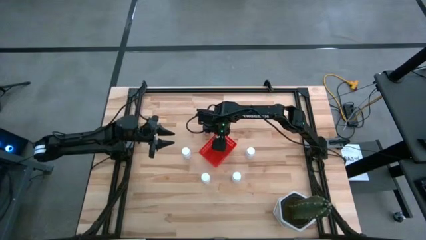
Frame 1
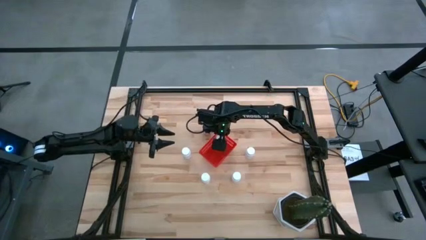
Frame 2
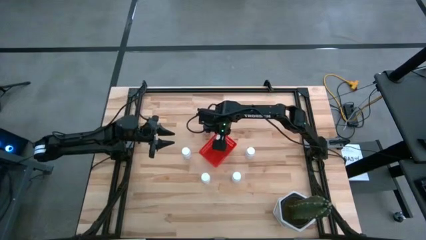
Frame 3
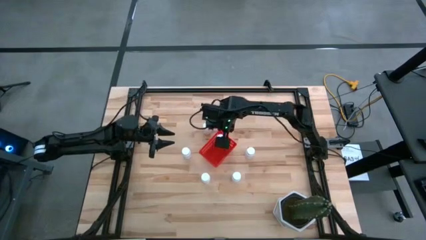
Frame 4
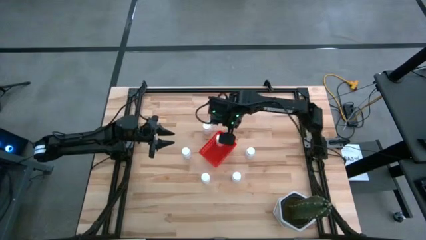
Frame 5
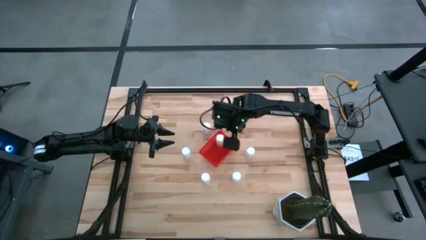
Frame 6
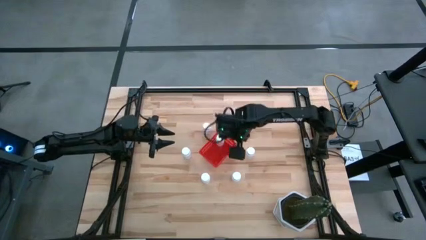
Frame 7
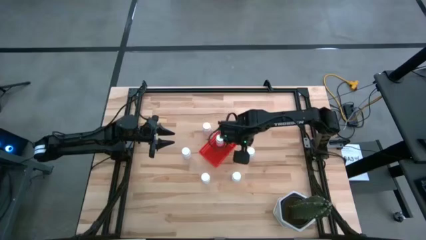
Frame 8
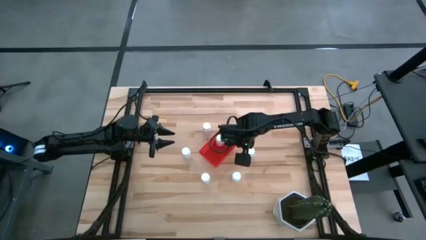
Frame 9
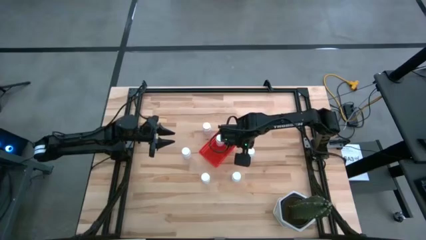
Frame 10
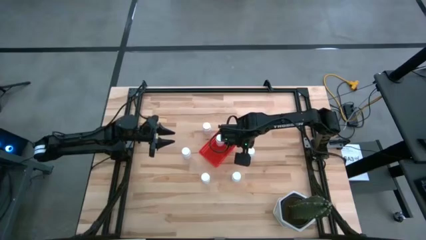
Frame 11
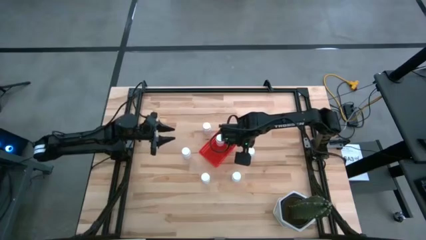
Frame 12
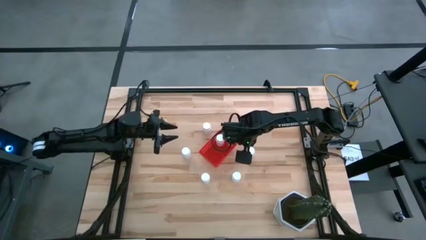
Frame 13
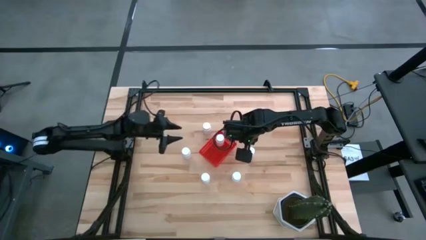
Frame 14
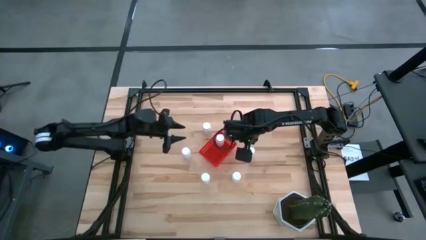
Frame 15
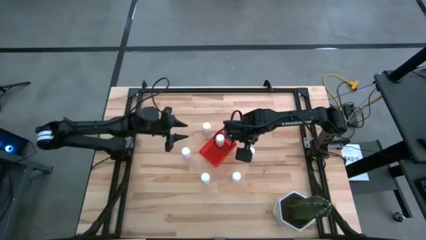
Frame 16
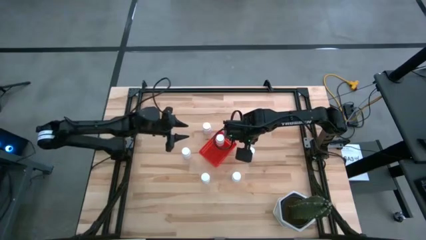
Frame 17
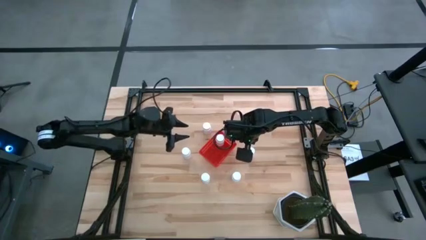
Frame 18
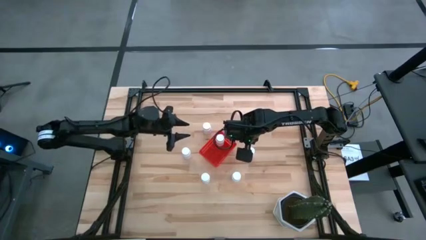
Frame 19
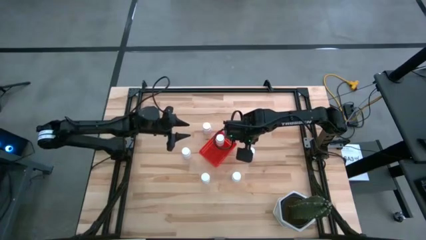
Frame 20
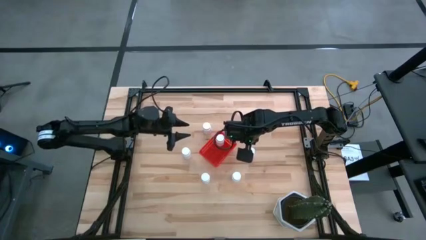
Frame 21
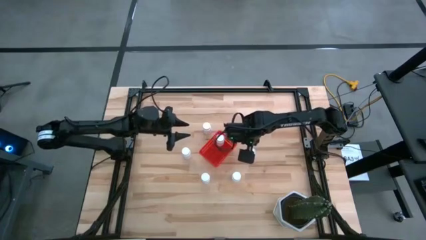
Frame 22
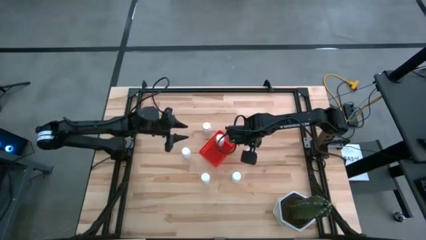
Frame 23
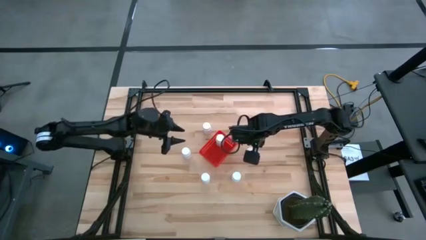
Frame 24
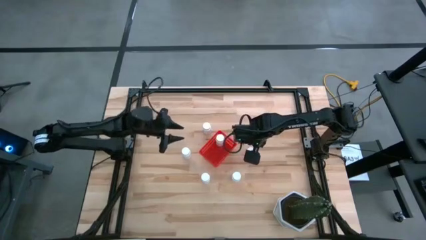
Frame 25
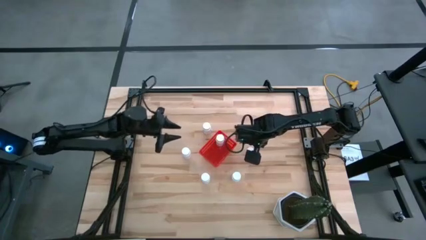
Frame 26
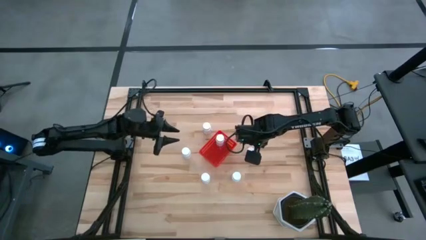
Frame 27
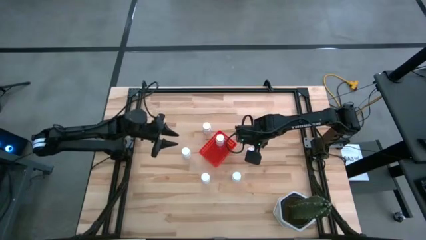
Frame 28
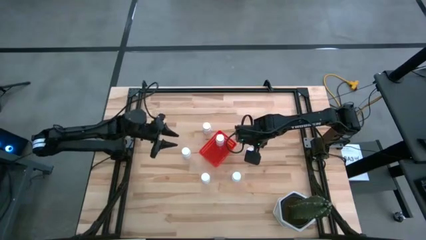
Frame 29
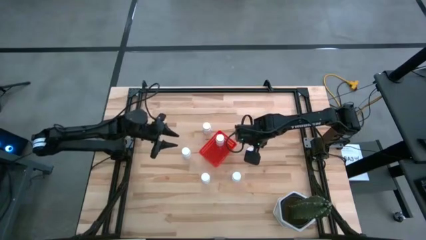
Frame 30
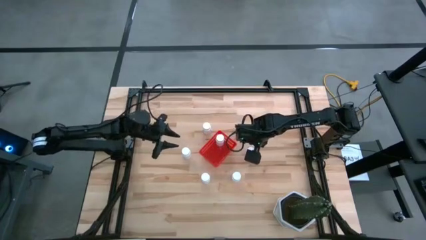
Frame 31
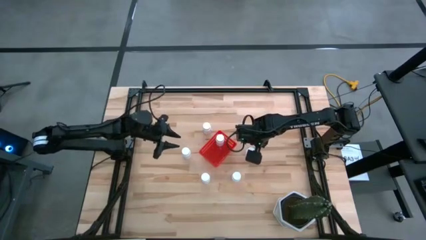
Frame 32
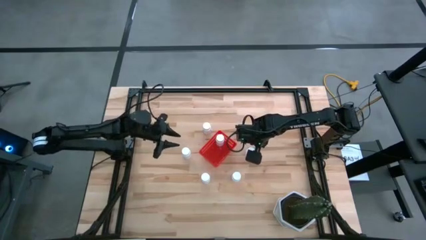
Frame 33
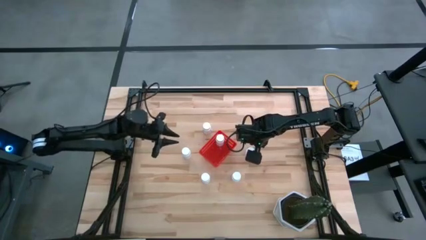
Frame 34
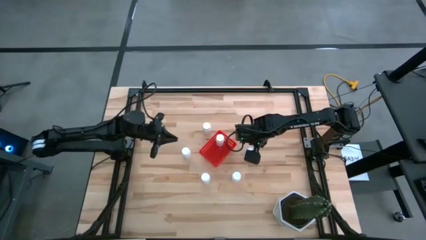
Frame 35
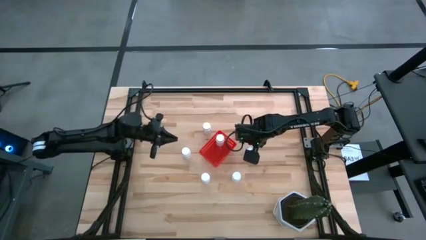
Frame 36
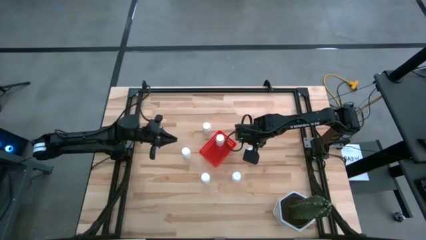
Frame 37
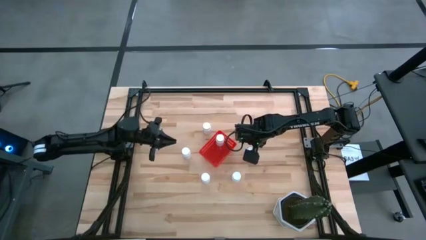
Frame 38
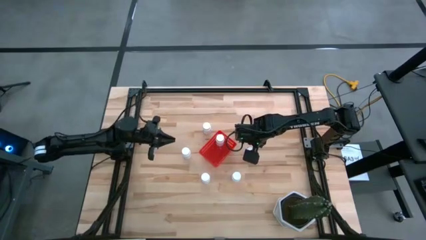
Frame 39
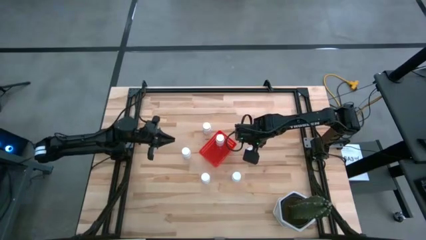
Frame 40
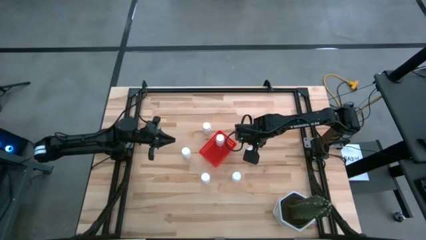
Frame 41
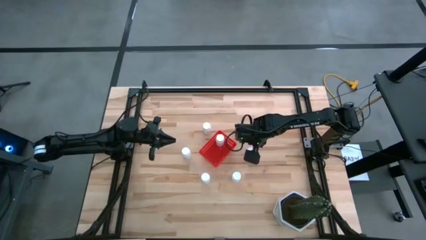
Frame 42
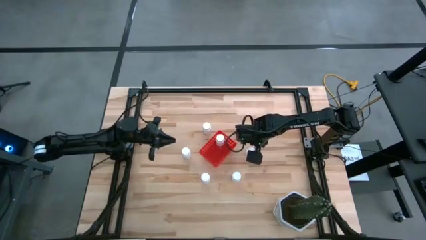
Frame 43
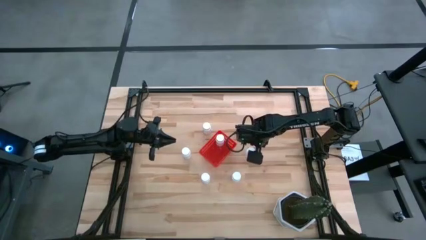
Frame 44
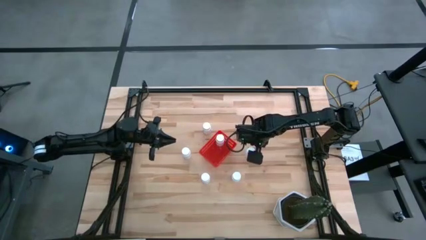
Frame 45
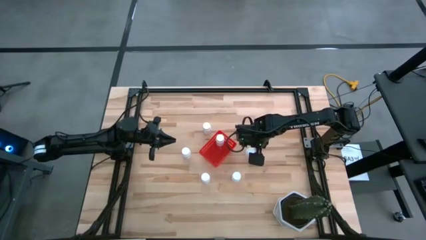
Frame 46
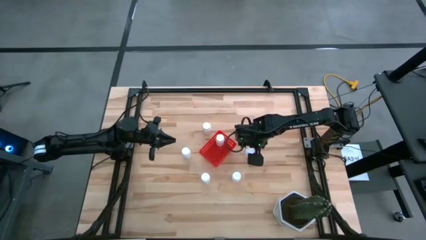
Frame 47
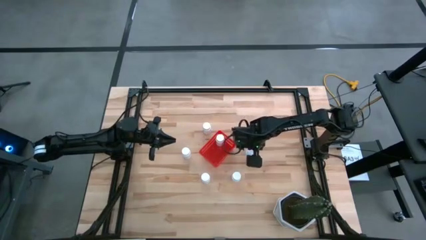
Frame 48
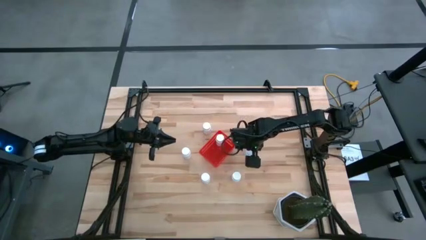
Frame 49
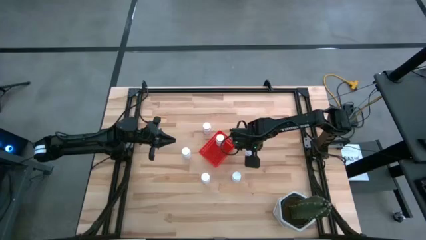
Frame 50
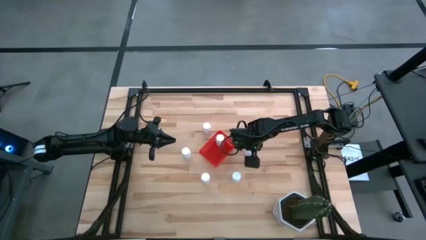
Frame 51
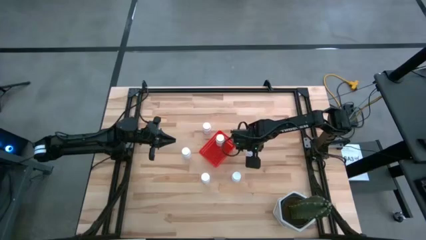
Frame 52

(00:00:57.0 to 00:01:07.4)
Task: Pick and place pill bottles into a basket
Put the white pill bottle into the red basket
